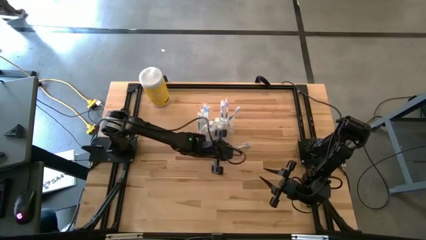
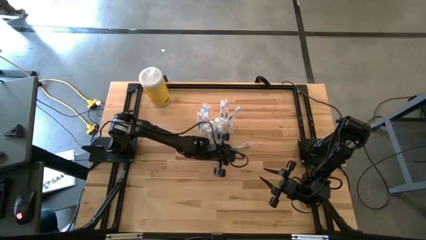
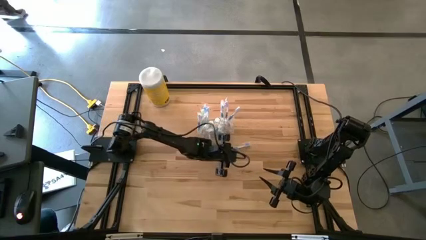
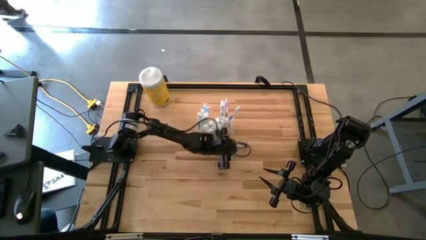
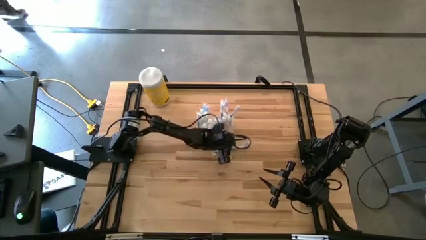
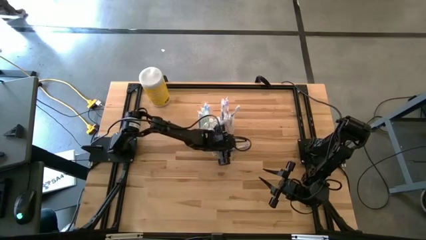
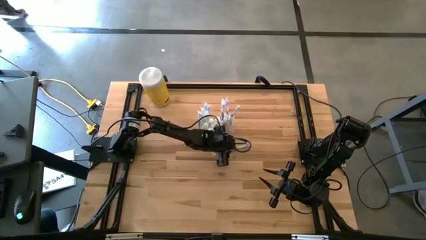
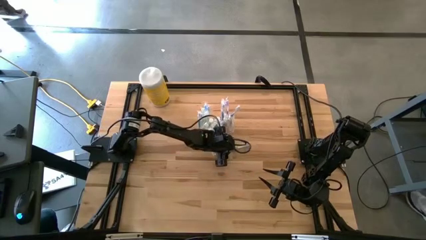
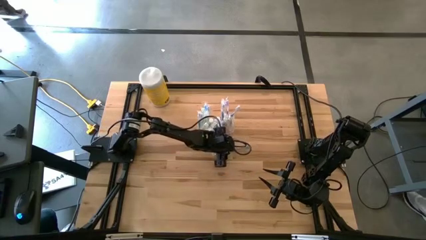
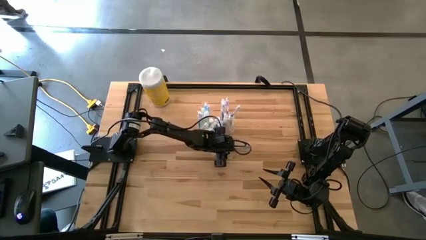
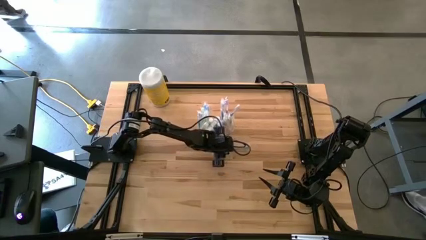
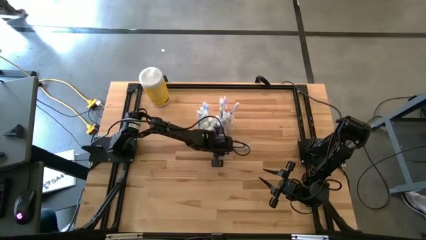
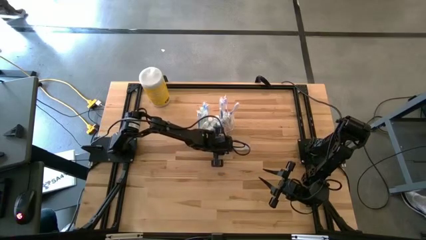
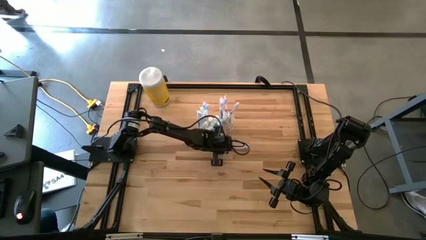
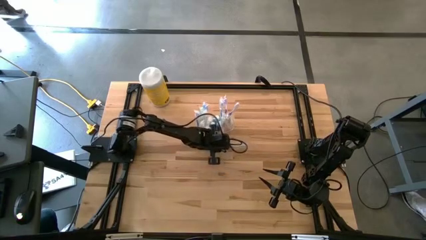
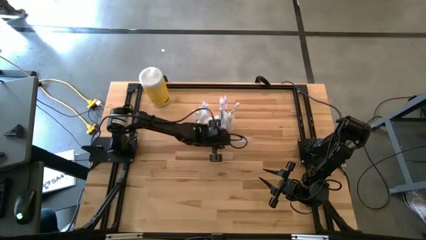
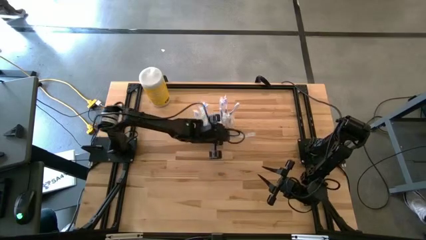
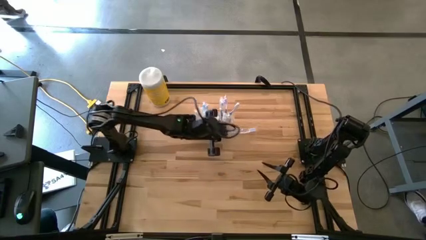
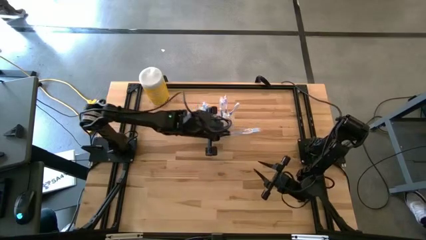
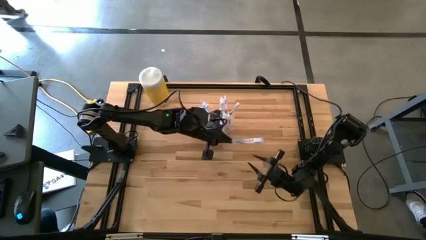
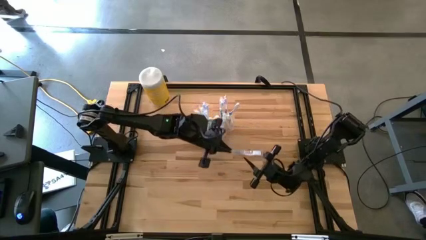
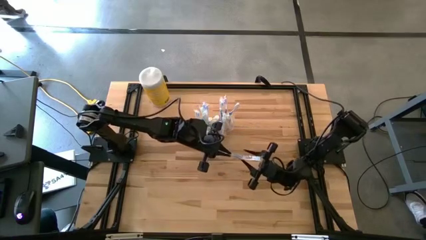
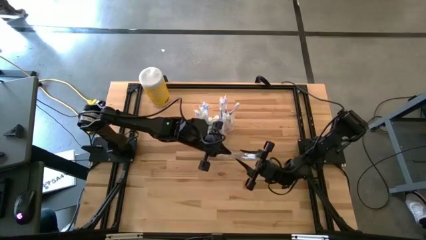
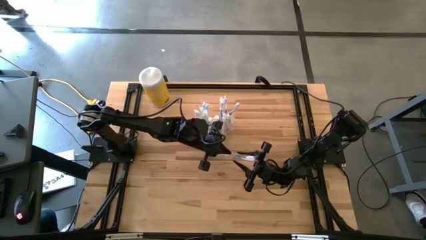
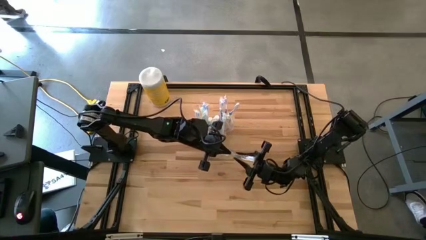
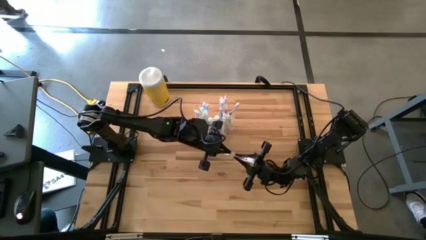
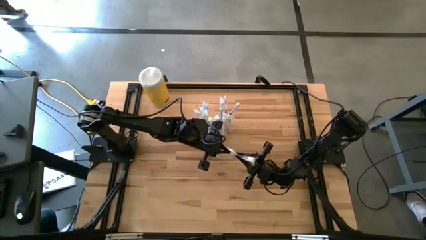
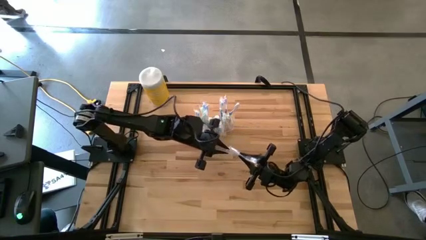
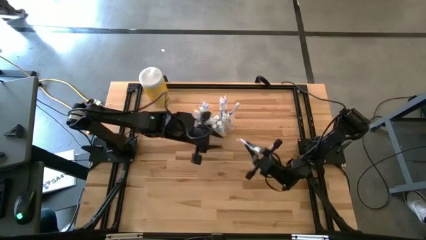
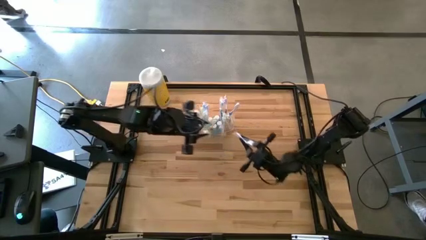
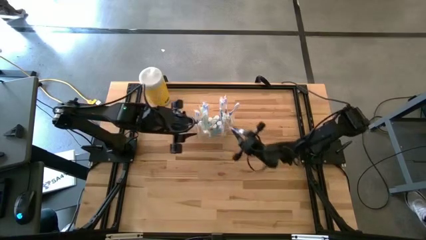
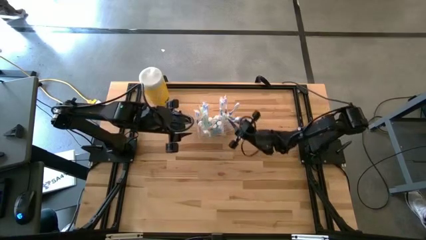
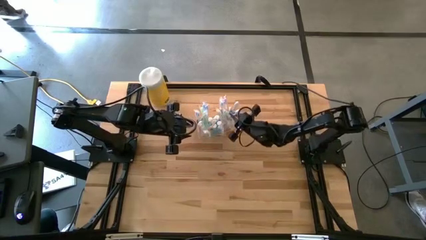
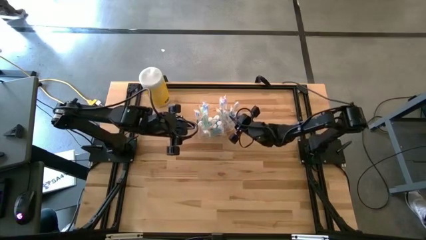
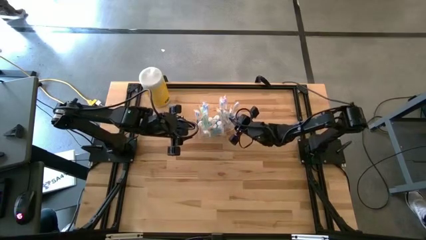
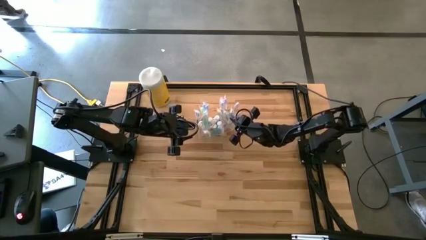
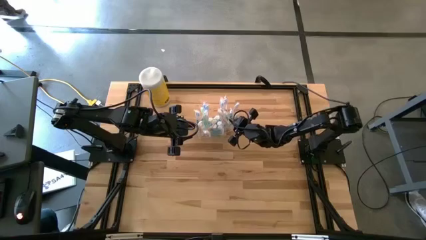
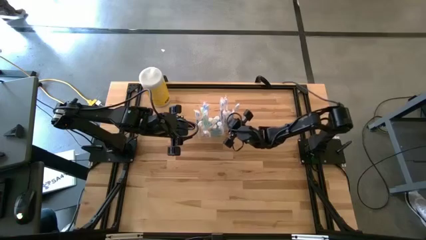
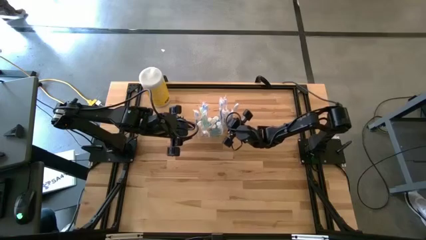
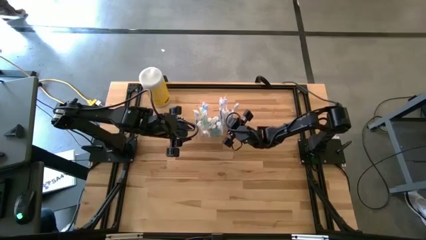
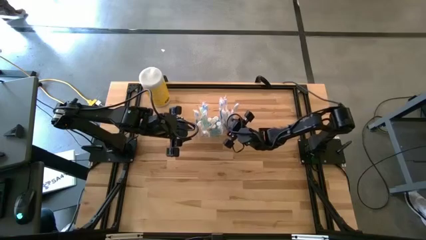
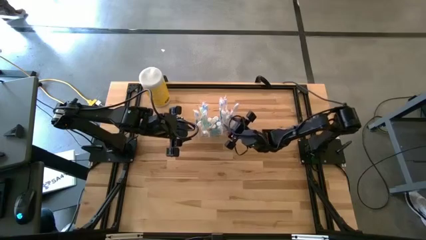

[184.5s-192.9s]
Task: Pick & Place toothbrushing station
Put the blue toothbrush into the transparent organizer

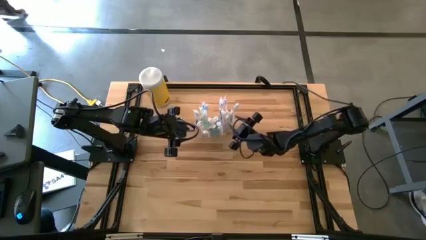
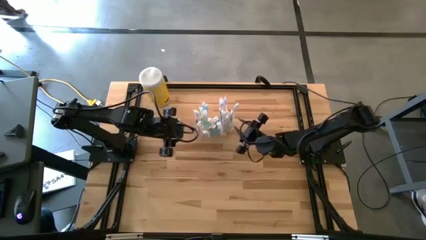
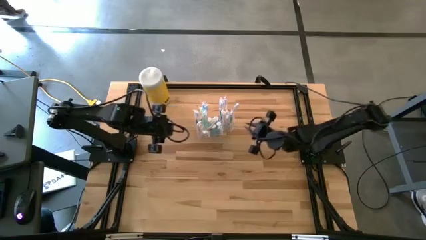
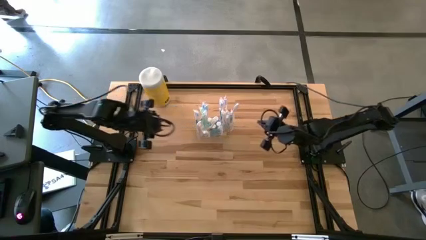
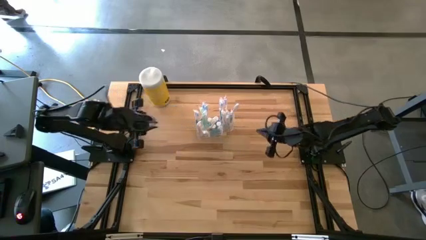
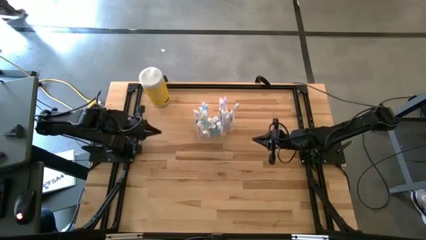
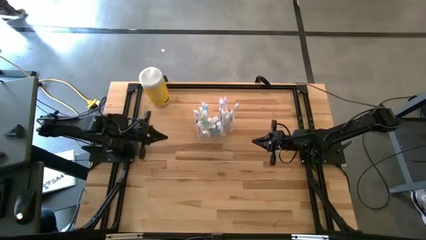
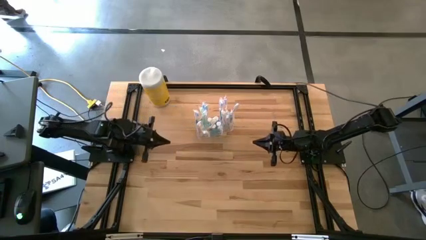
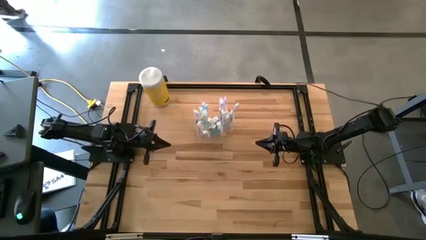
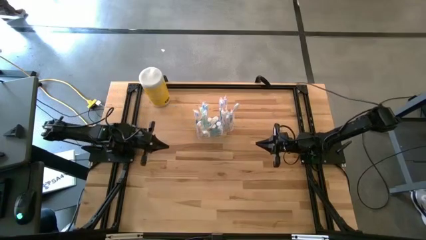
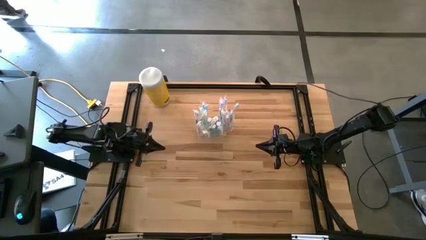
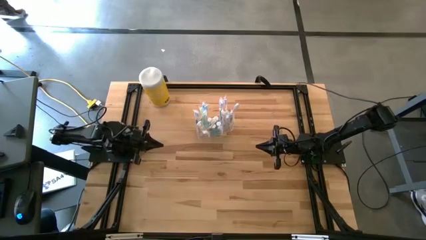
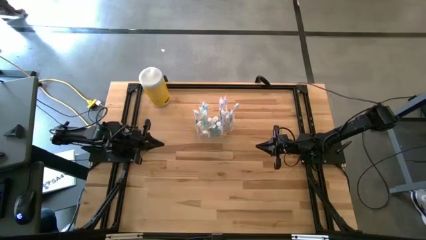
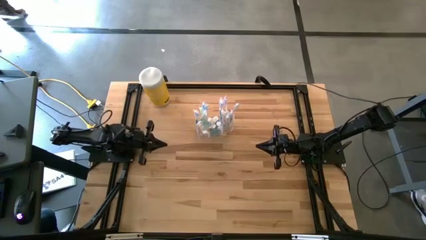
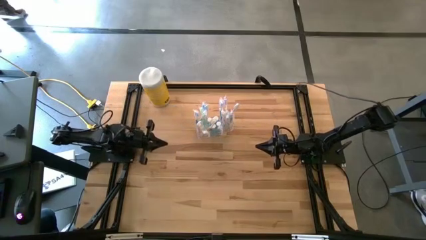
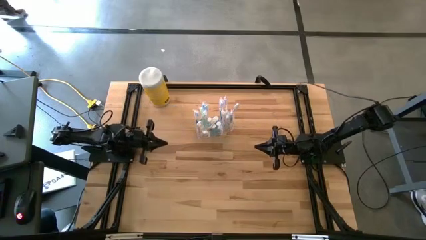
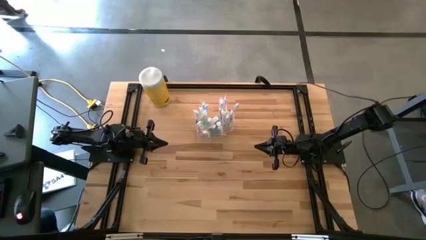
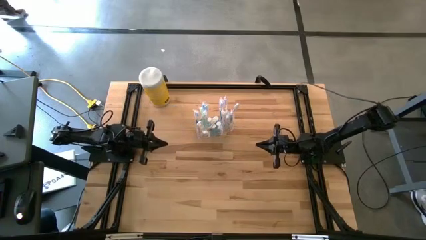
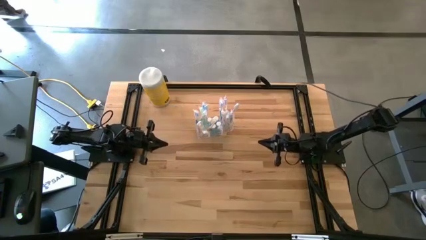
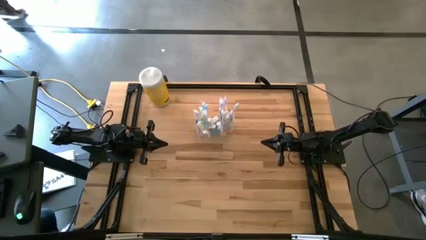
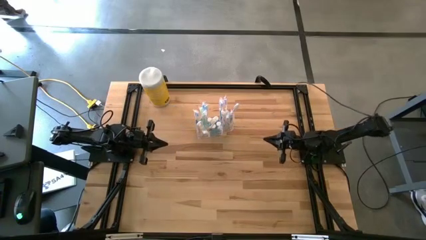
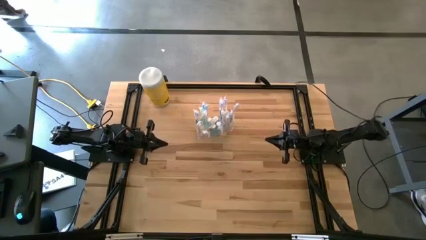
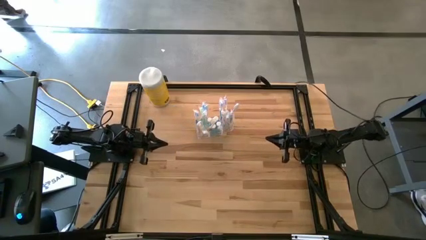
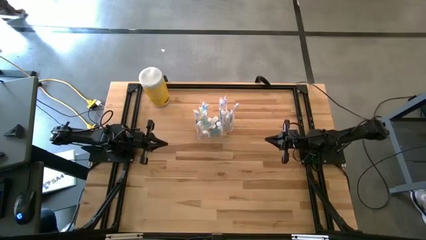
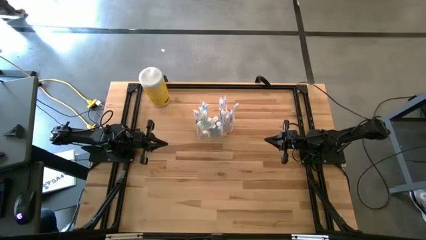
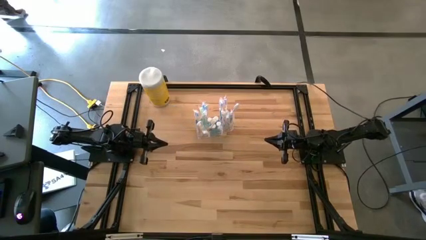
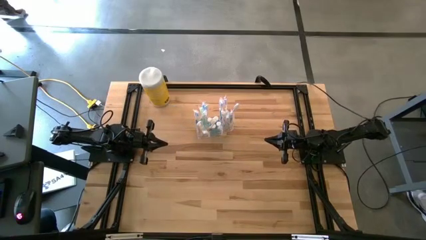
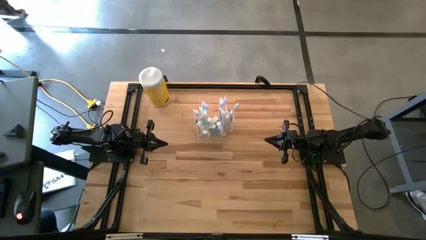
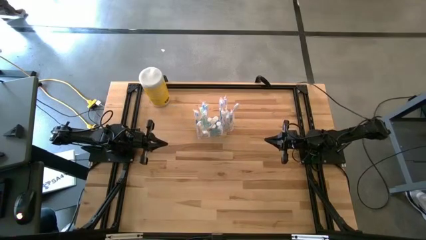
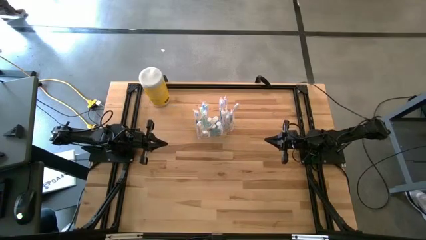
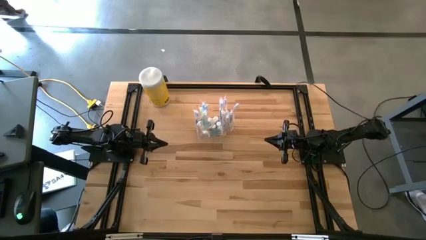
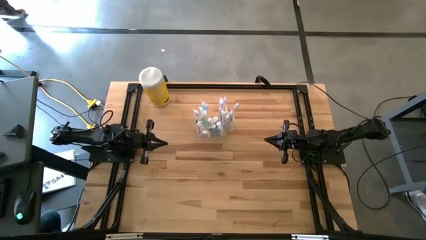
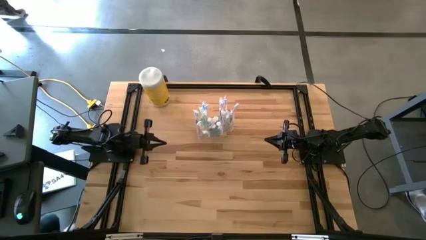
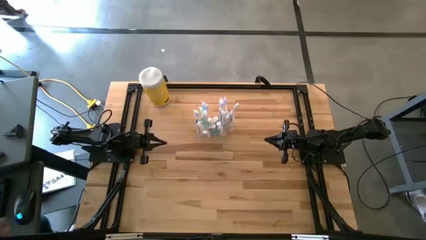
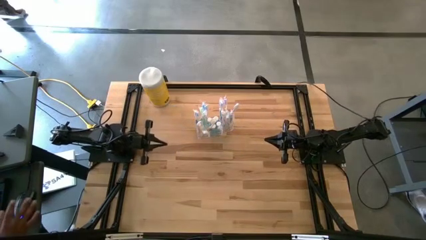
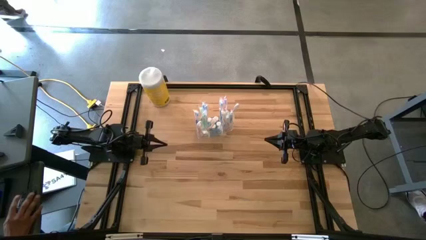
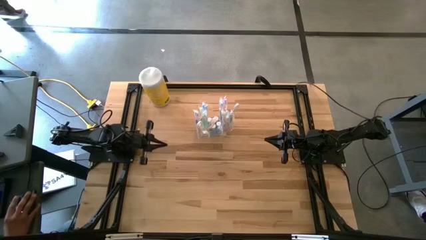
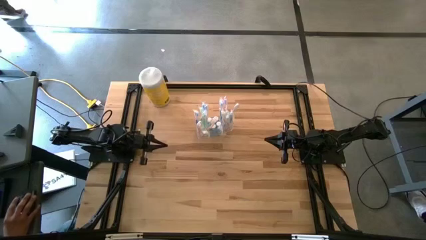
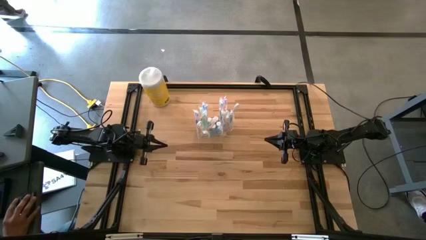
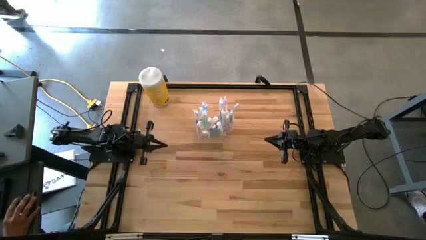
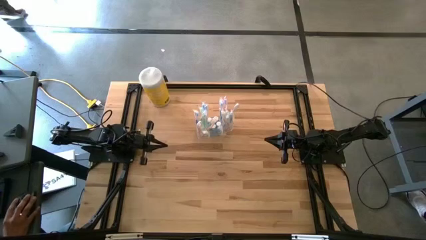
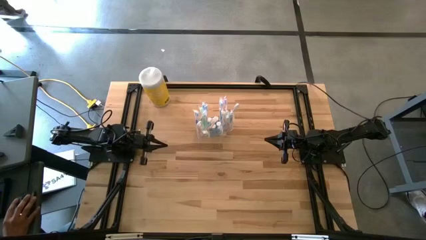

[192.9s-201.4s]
Return to Home Position
